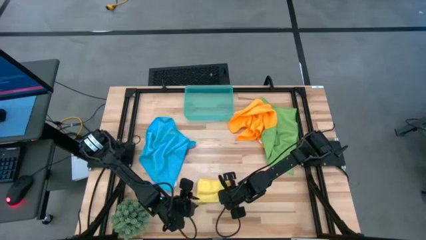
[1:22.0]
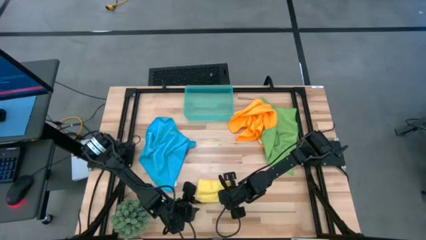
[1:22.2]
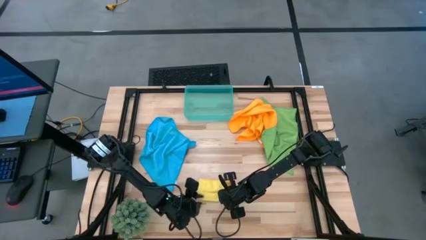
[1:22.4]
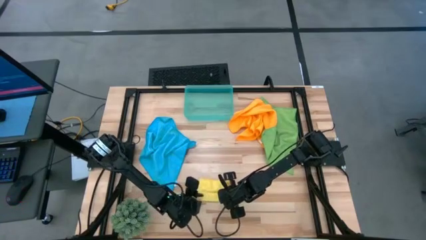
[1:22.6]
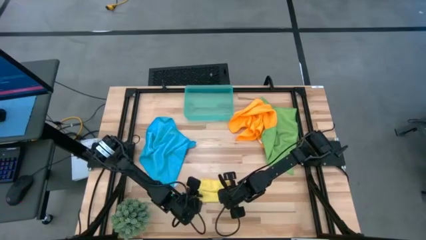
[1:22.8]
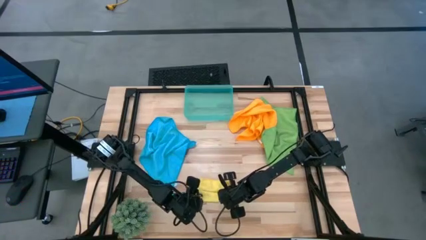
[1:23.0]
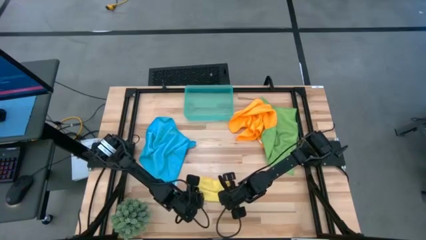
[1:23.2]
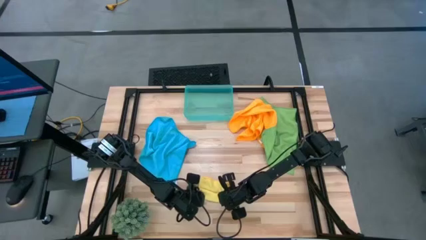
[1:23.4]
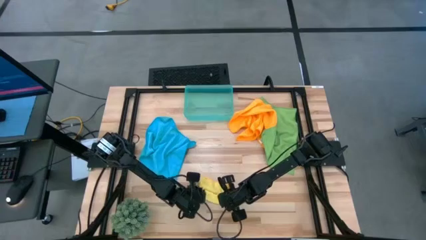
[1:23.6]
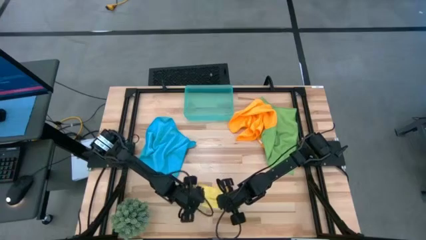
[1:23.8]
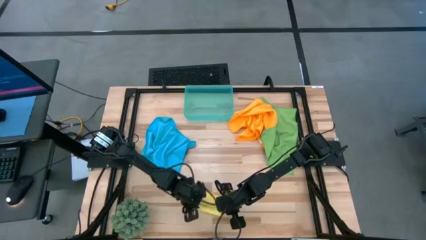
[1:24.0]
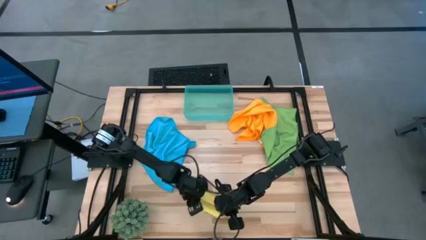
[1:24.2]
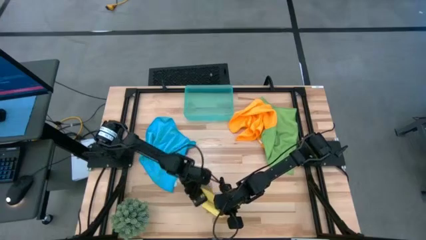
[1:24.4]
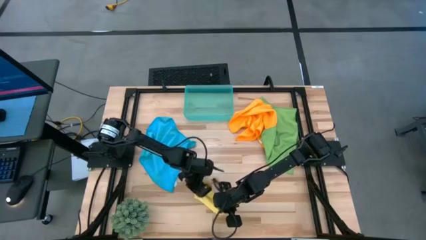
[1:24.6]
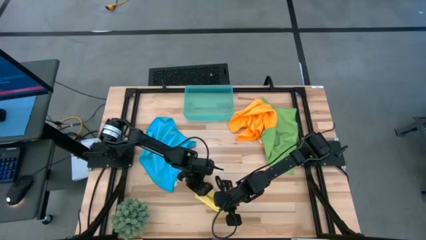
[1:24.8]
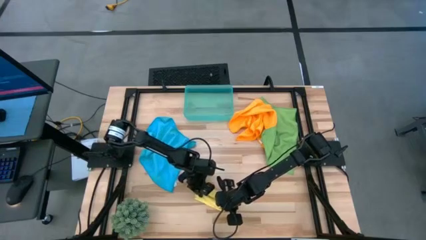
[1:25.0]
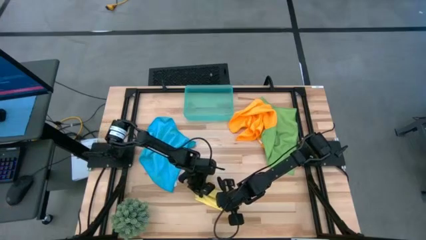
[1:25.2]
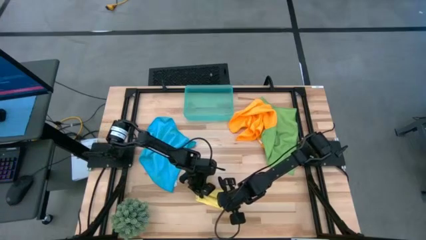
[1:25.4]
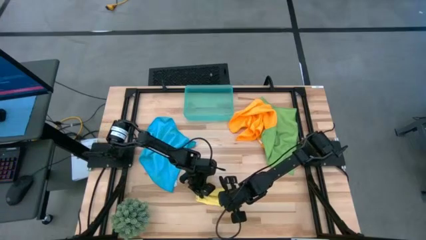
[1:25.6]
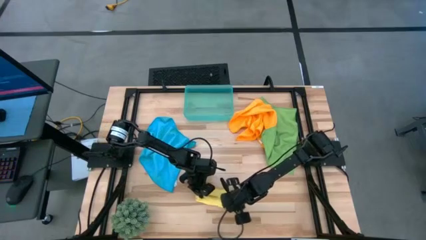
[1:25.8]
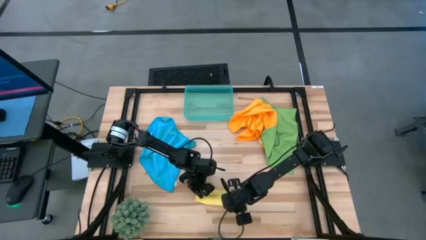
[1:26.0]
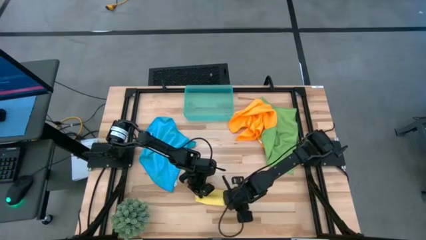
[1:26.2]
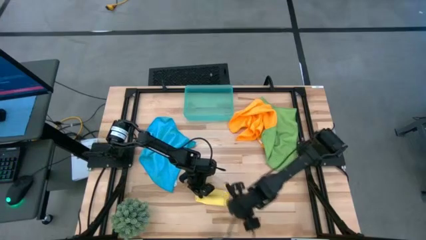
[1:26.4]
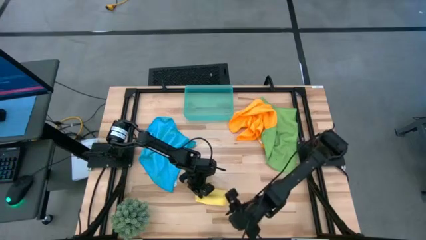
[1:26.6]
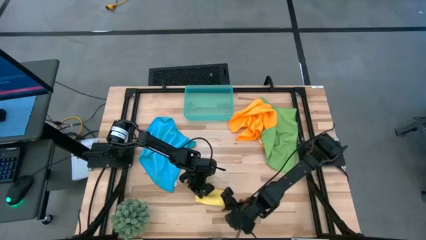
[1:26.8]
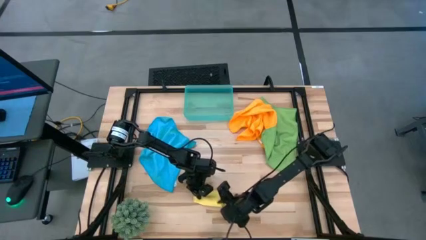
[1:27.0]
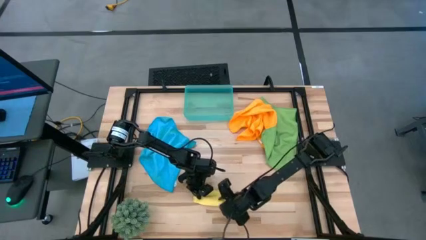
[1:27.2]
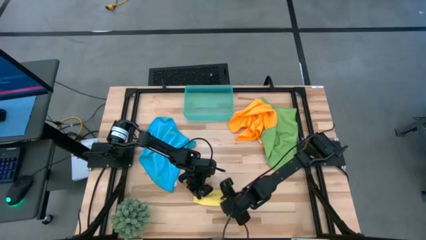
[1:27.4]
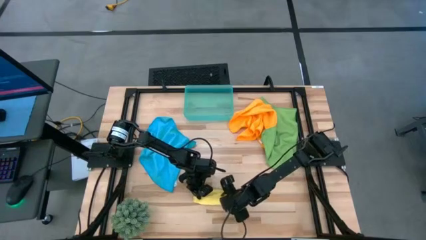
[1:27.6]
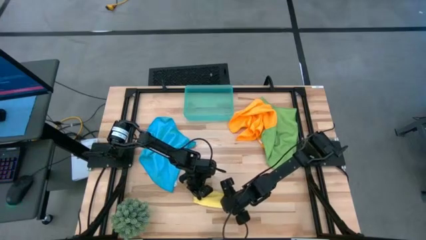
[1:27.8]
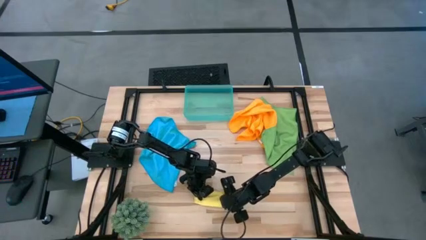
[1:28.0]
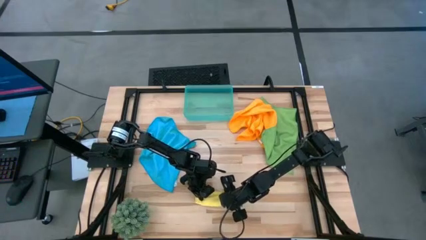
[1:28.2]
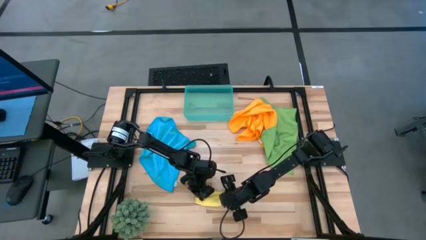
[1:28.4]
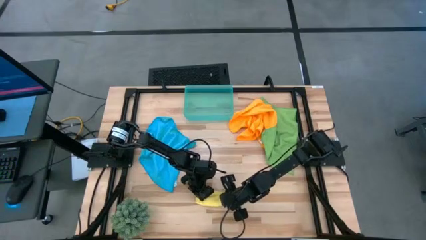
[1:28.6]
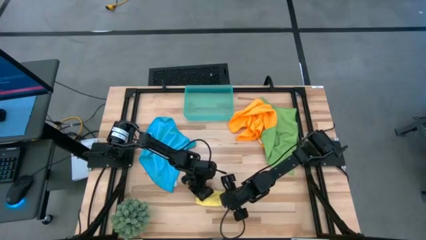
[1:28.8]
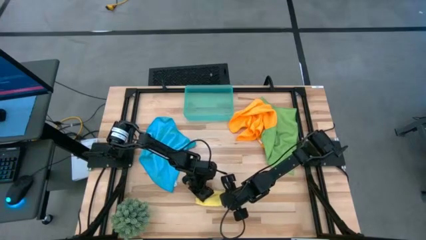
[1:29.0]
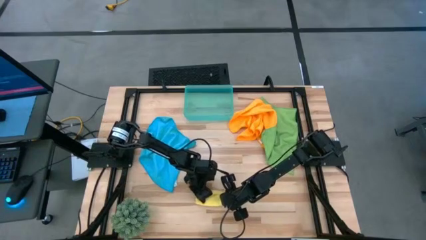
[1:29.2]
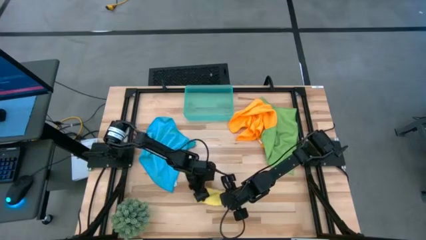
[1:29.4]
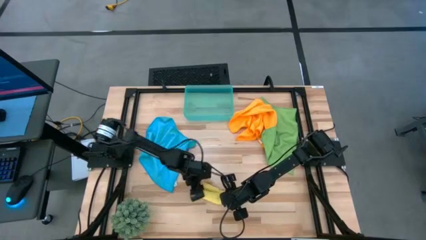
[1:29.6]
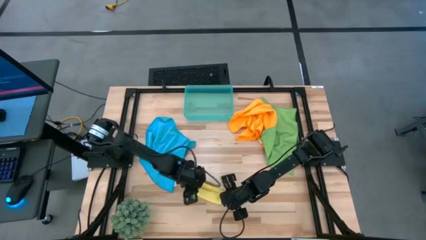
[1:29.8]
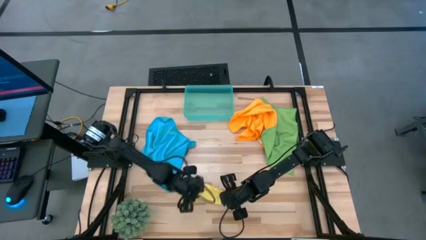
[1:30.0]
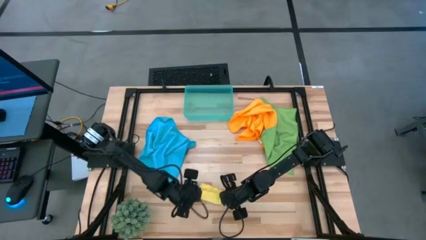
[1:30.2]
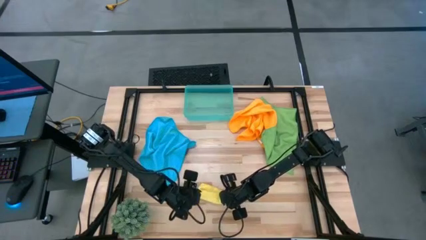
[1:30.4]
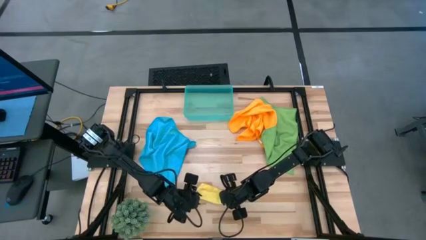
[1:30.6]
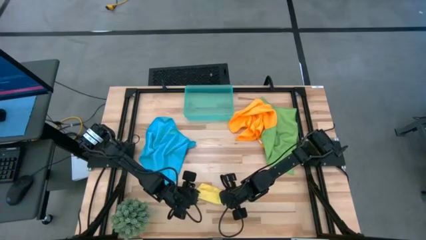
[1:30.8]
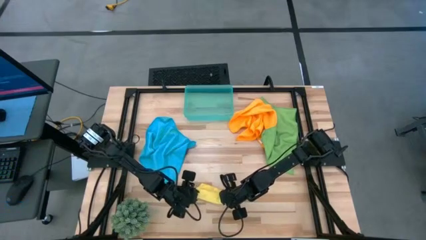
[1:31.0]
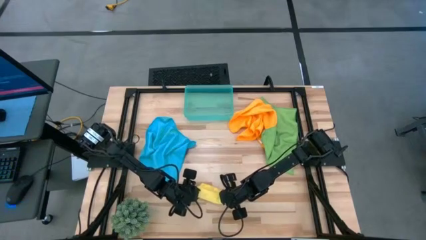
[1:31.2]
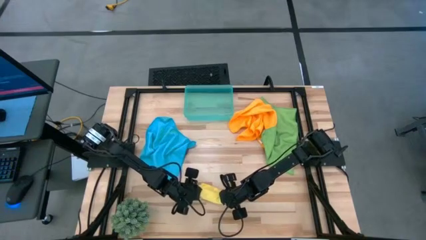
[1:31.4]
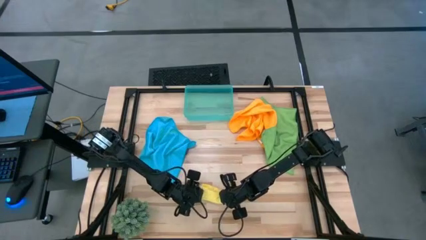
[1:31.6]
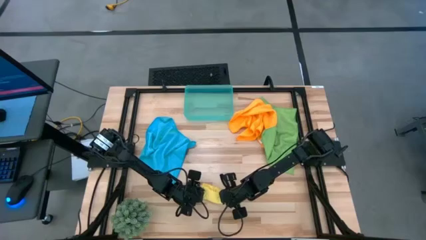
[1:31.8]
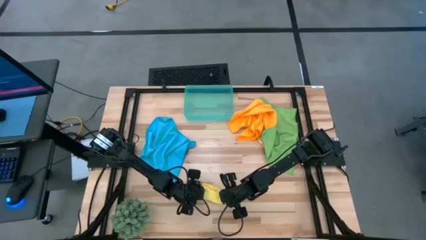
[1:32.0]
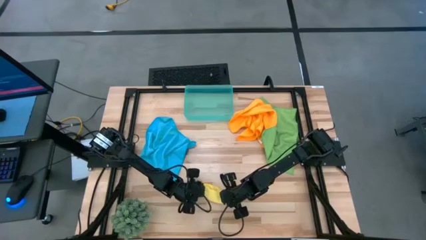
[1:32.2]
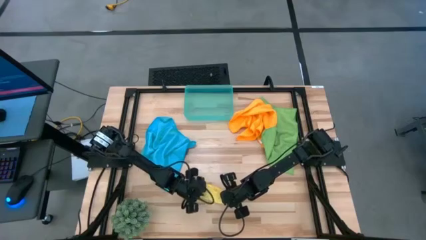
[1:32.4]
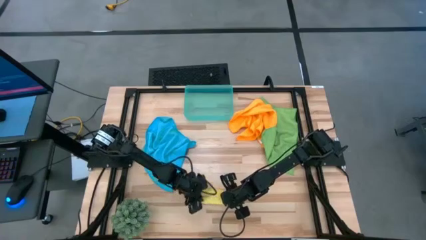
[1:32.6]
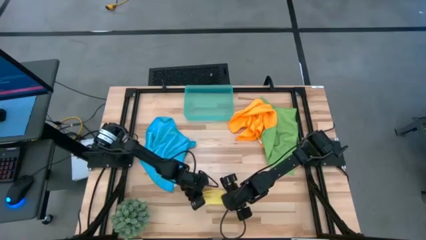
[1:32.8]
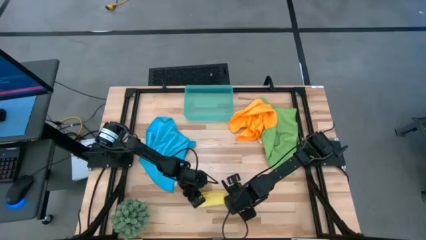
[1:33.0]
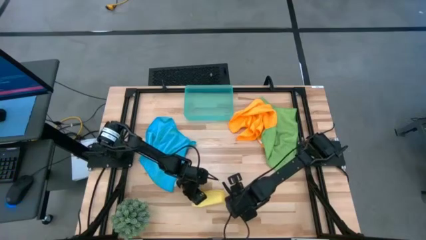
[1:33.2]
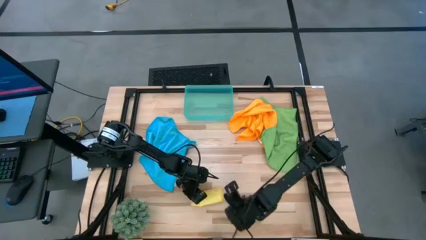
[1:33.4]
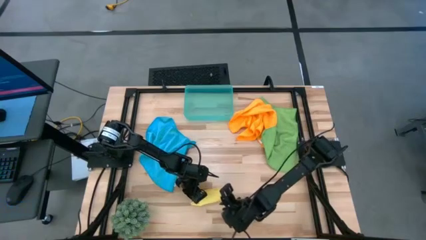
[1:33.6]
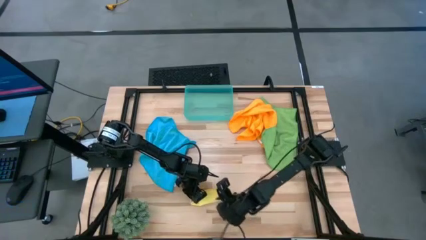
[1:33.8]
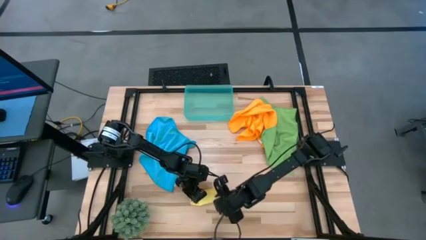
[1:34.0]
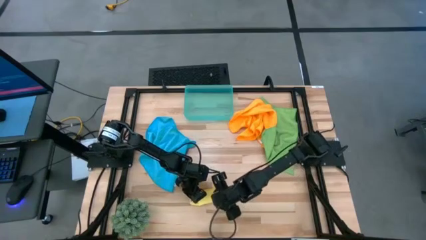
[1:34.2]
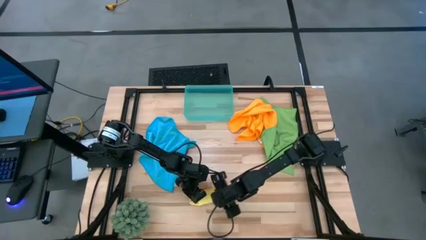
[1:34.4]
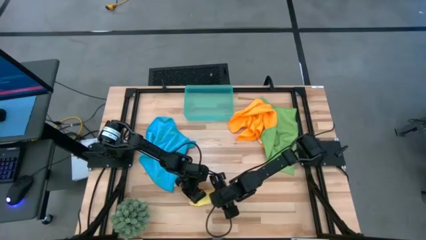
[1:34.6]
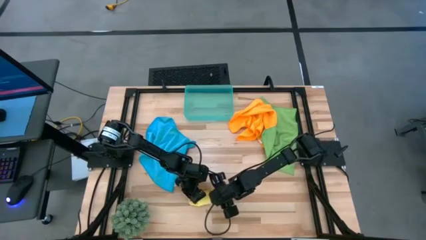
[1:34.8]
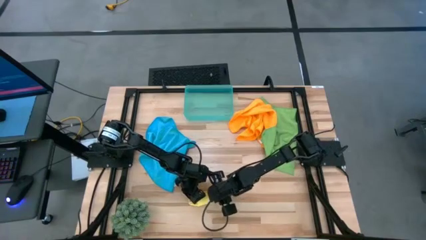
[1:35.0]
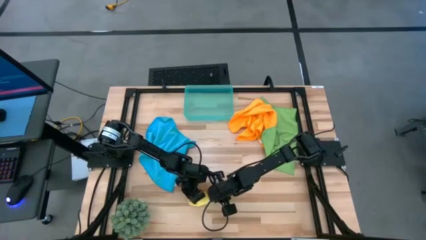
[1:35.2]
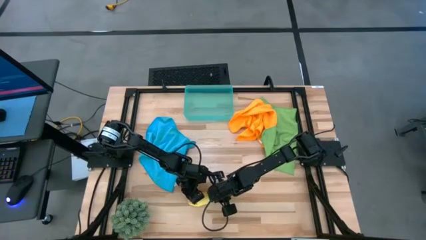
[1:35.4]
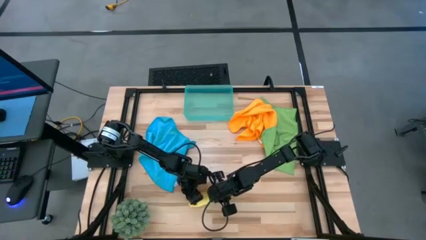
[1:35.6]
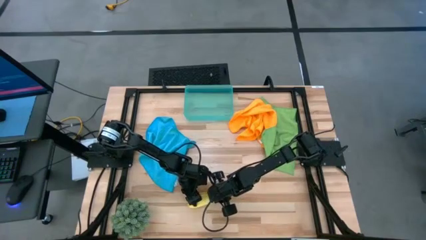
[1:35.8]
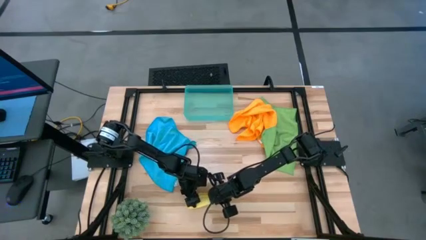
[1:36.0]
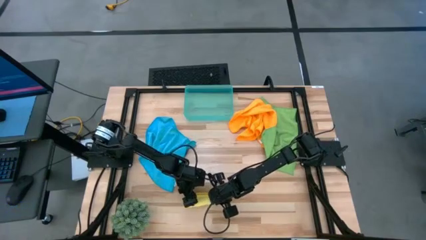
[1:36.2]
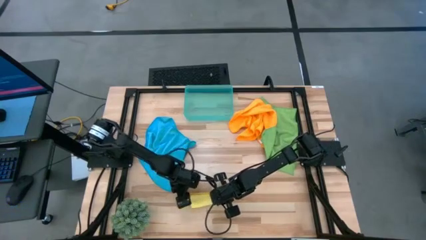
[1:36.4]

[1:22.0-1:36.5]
Task: Roll microfiber towels into tight, uniform cylinder then place into a basket
Roll the yellow microfiber towel

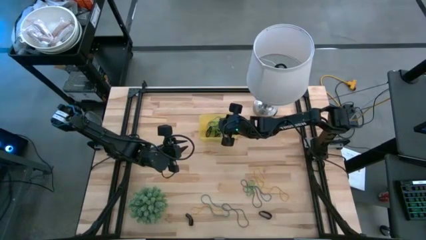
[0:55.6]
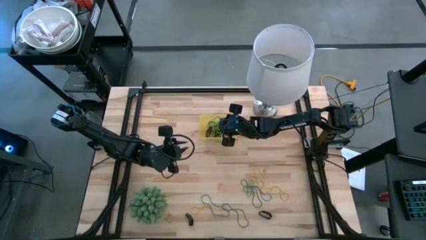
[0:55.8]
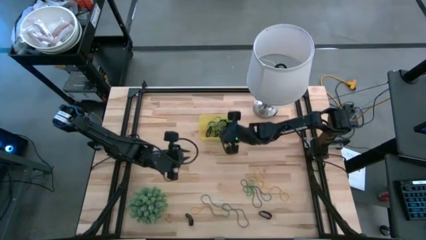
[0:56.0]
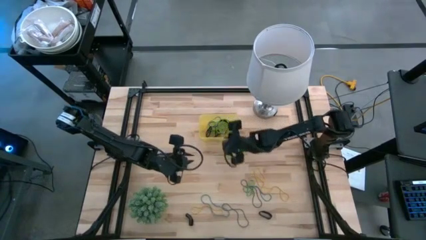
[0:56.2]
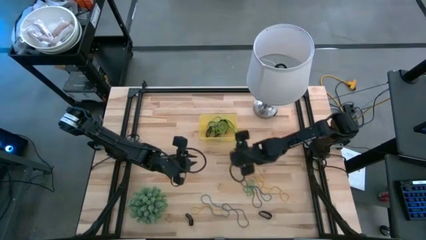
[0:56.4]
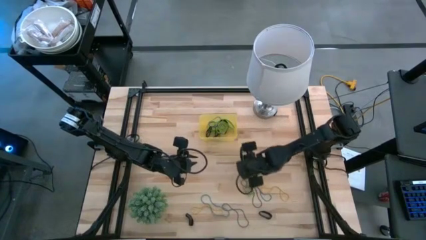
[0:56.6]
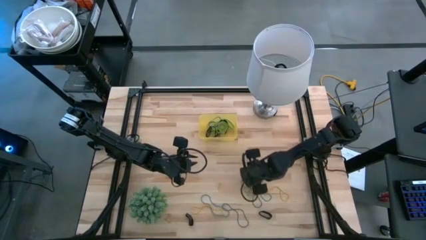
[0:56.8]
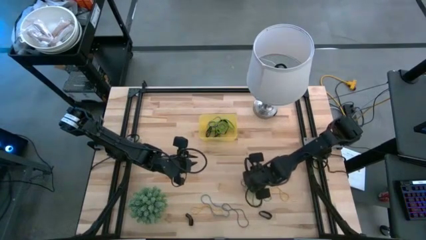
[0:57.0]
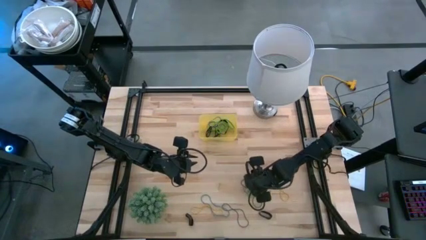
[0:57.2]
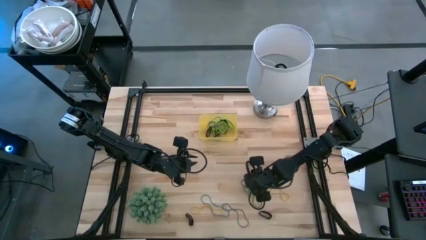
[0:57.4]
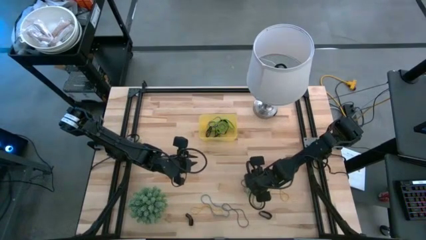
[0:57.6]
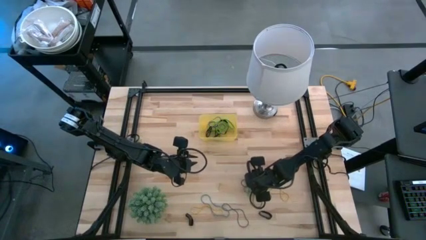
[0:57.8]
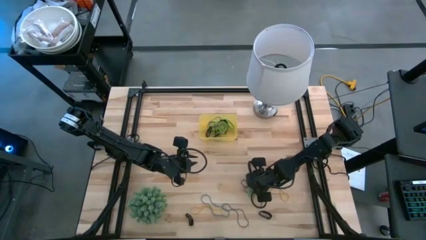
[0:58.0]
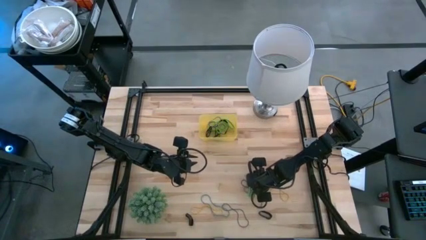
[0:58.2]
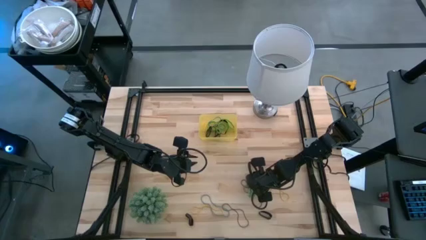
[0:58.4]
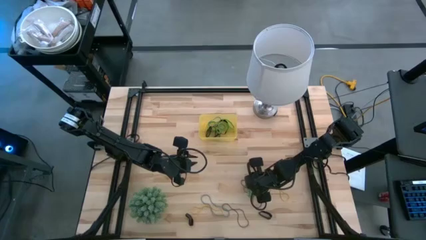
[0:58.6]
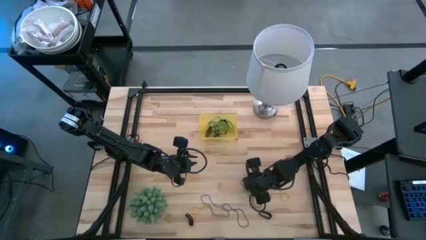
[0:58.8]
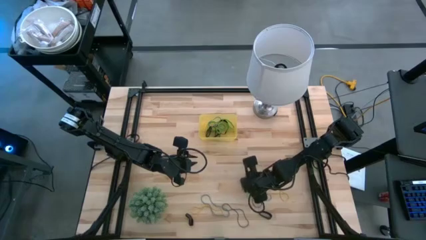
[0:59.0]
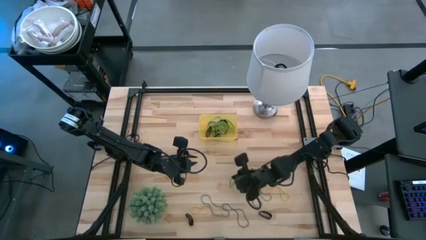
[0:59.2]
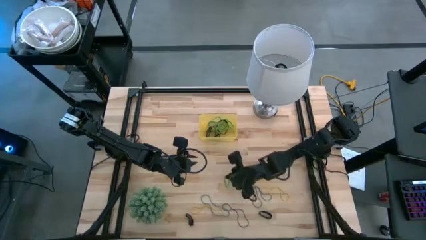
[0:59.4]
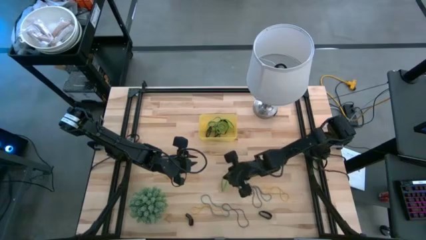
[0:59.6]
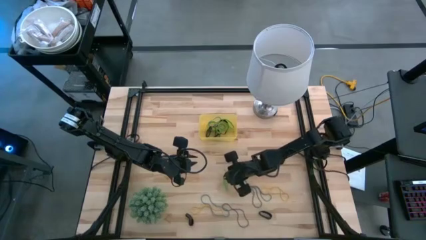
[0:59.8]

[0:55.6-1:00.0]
Task: Pick and place rubber bands into bin
Put the green rubber band into the yellow bin
